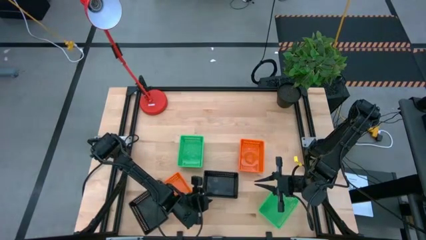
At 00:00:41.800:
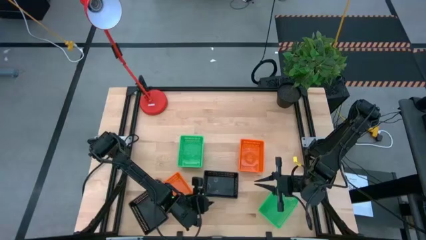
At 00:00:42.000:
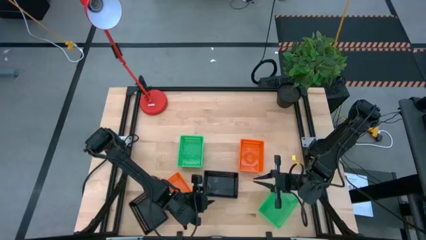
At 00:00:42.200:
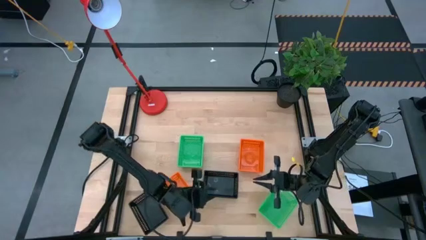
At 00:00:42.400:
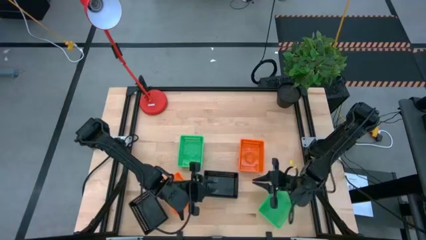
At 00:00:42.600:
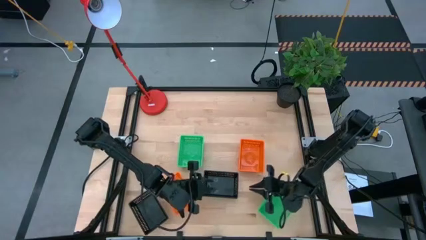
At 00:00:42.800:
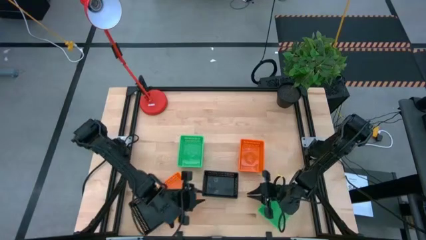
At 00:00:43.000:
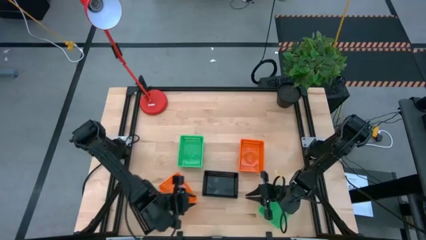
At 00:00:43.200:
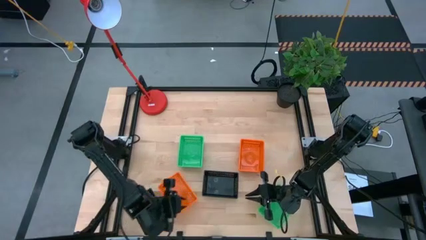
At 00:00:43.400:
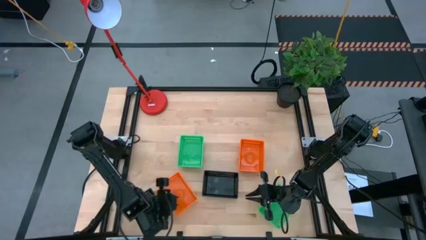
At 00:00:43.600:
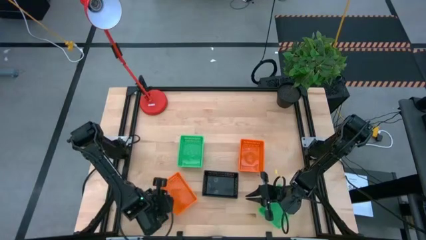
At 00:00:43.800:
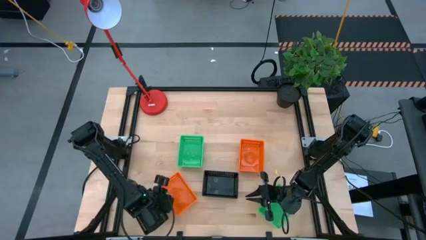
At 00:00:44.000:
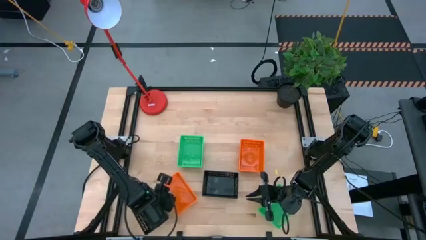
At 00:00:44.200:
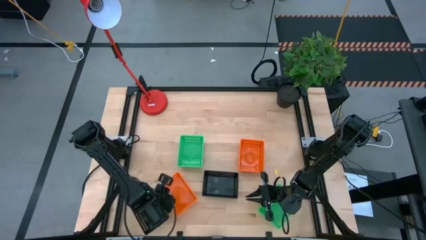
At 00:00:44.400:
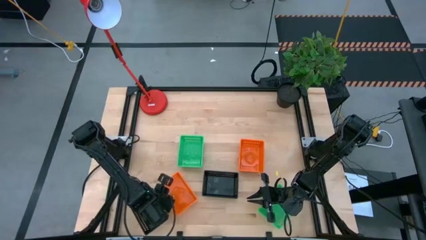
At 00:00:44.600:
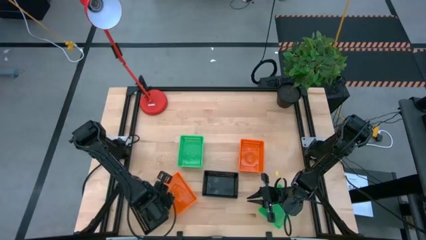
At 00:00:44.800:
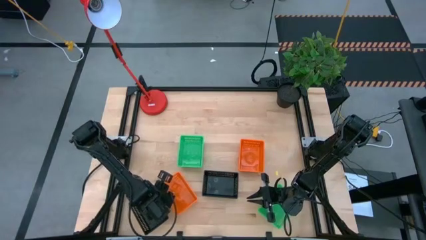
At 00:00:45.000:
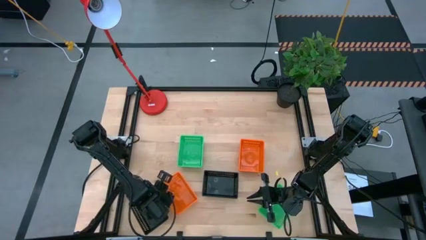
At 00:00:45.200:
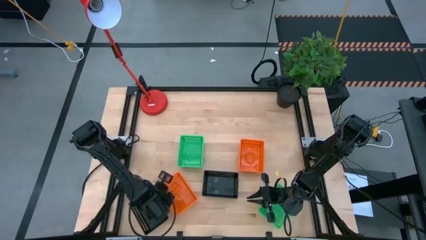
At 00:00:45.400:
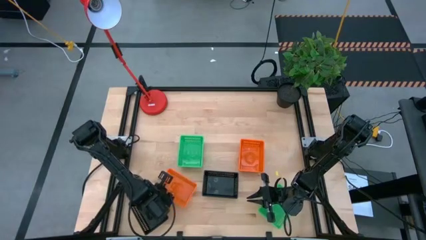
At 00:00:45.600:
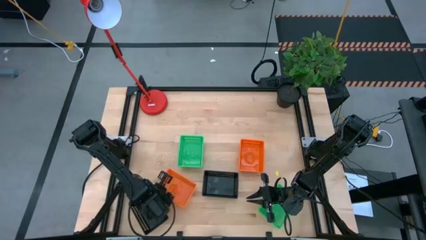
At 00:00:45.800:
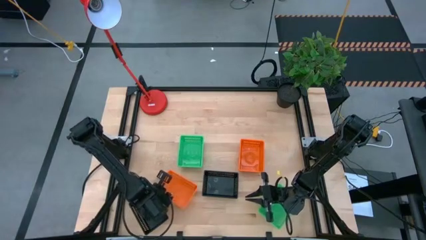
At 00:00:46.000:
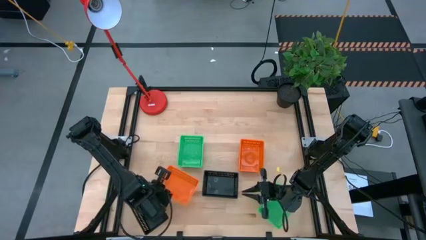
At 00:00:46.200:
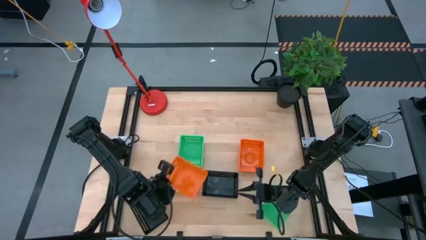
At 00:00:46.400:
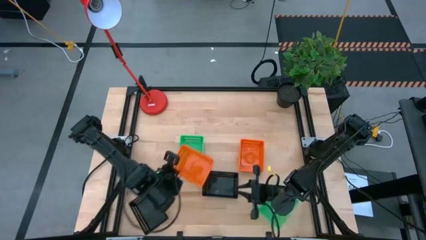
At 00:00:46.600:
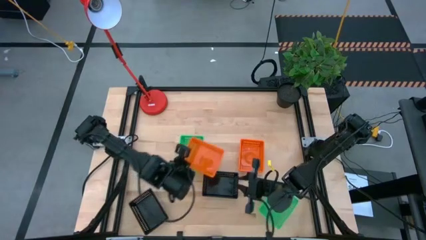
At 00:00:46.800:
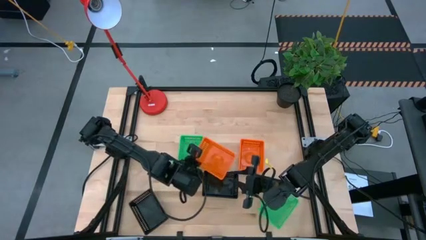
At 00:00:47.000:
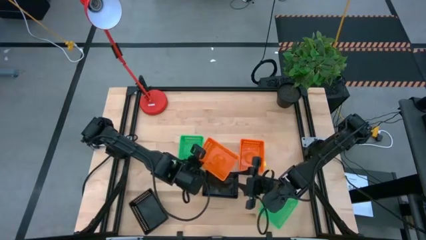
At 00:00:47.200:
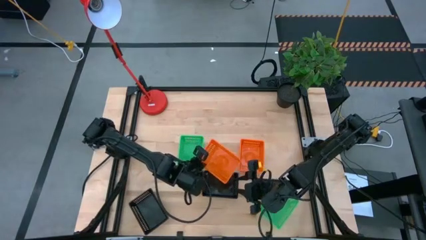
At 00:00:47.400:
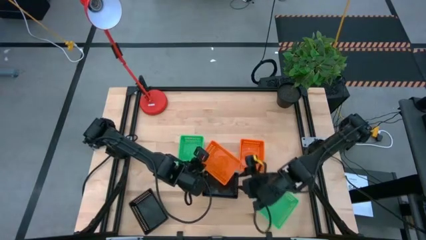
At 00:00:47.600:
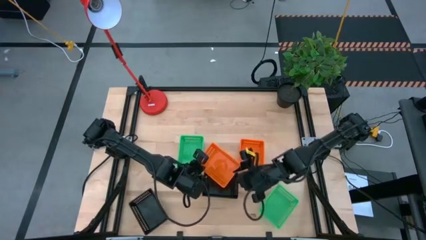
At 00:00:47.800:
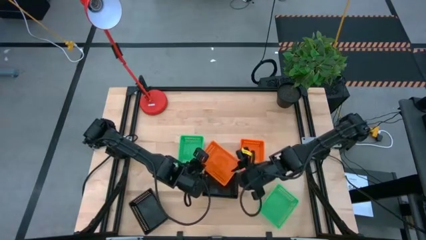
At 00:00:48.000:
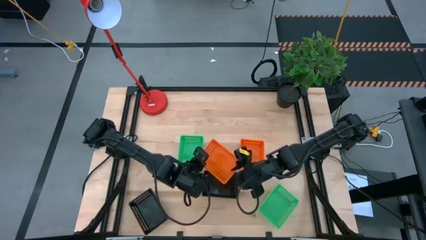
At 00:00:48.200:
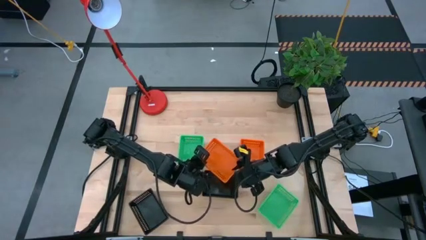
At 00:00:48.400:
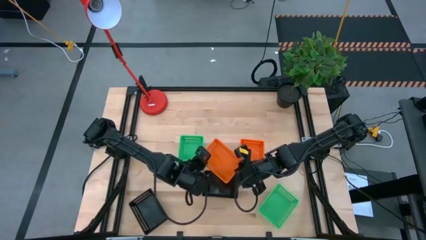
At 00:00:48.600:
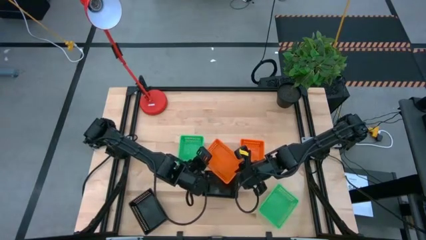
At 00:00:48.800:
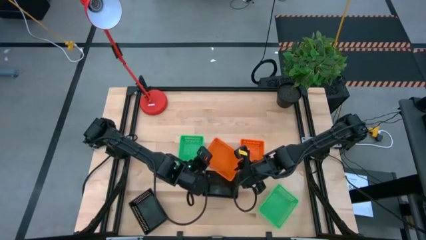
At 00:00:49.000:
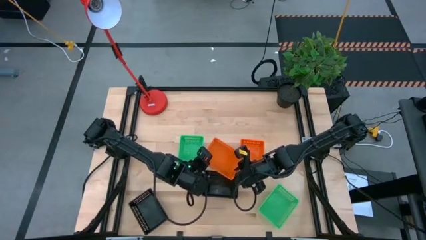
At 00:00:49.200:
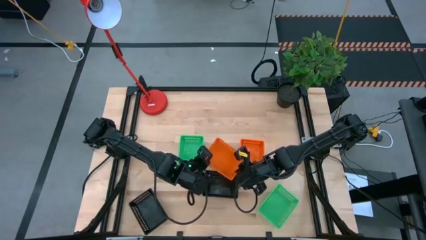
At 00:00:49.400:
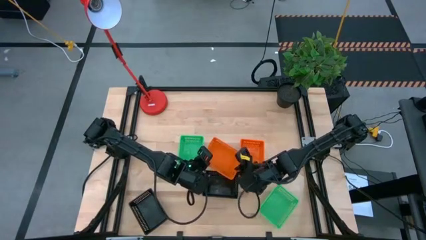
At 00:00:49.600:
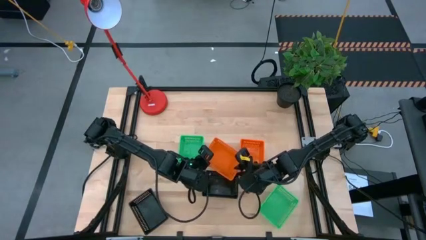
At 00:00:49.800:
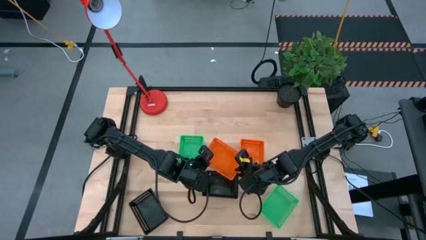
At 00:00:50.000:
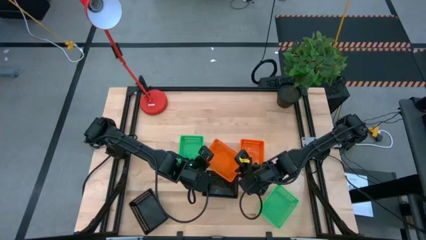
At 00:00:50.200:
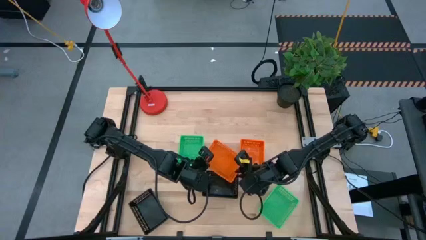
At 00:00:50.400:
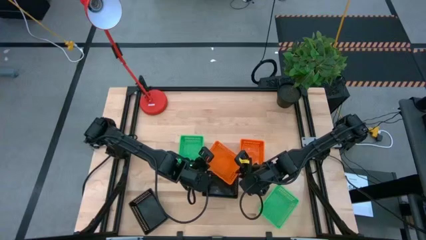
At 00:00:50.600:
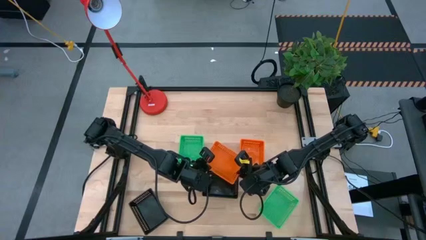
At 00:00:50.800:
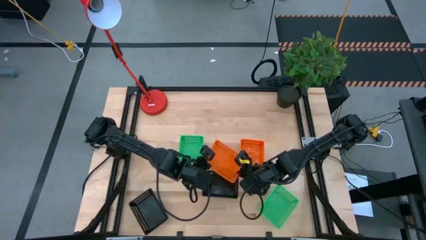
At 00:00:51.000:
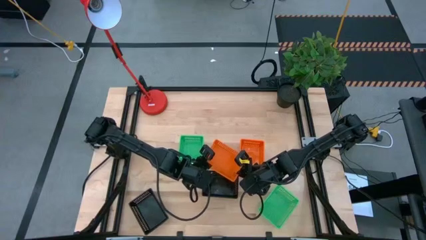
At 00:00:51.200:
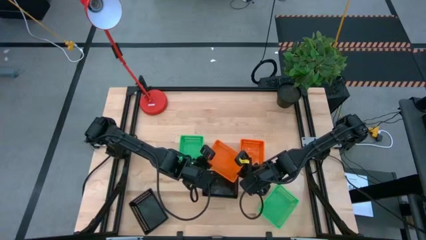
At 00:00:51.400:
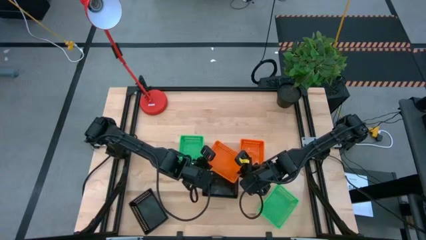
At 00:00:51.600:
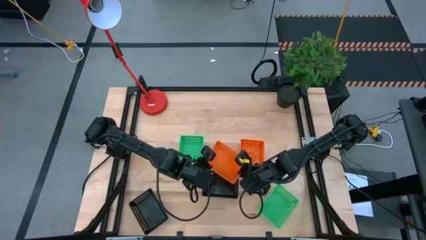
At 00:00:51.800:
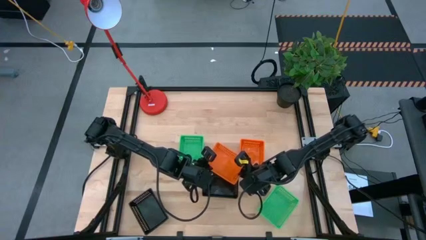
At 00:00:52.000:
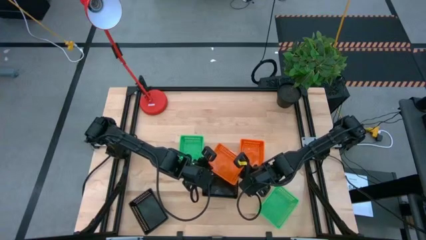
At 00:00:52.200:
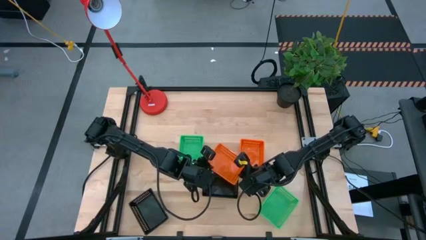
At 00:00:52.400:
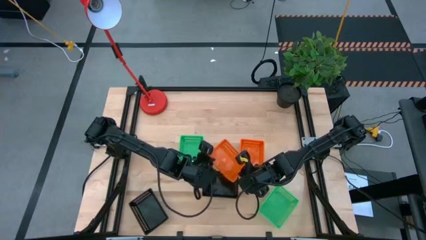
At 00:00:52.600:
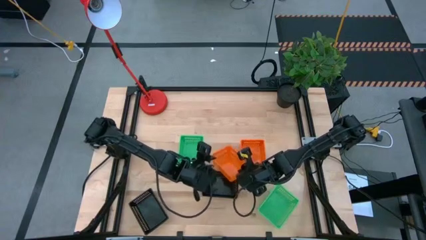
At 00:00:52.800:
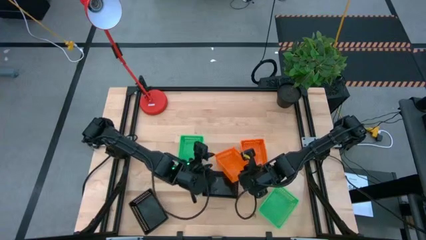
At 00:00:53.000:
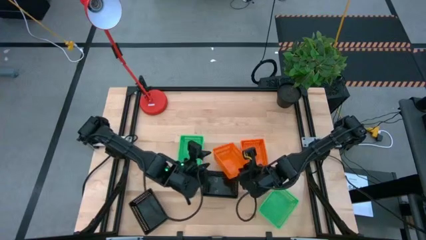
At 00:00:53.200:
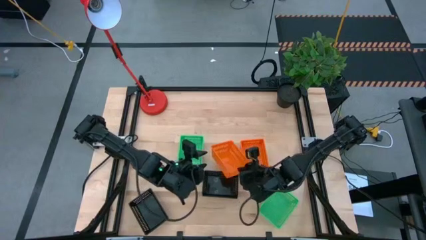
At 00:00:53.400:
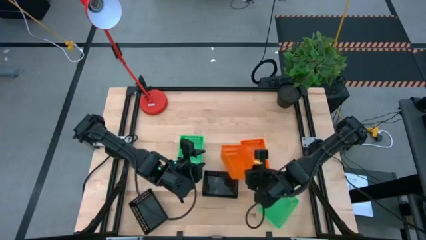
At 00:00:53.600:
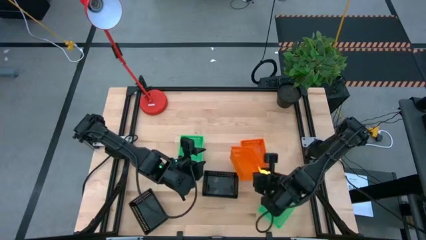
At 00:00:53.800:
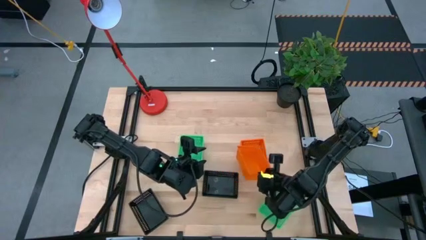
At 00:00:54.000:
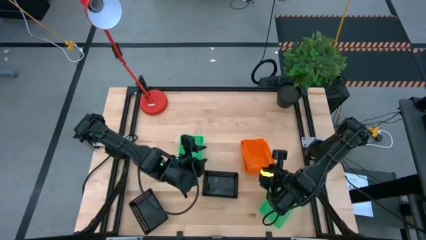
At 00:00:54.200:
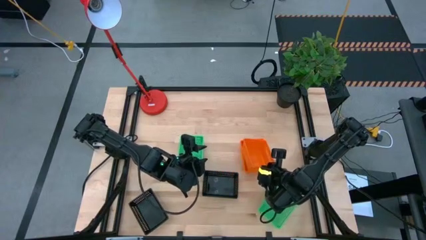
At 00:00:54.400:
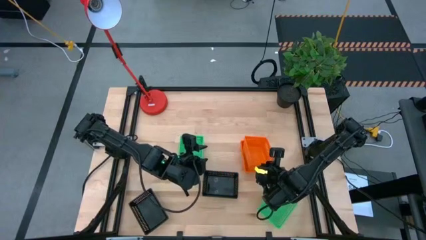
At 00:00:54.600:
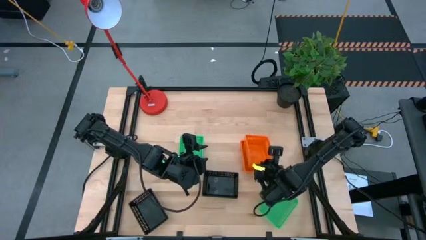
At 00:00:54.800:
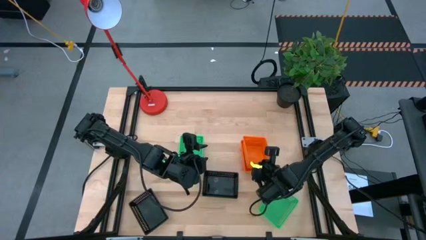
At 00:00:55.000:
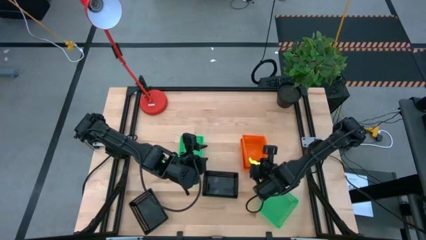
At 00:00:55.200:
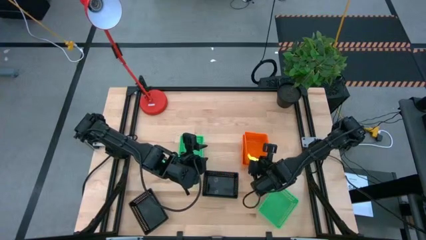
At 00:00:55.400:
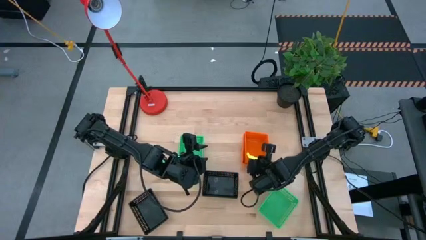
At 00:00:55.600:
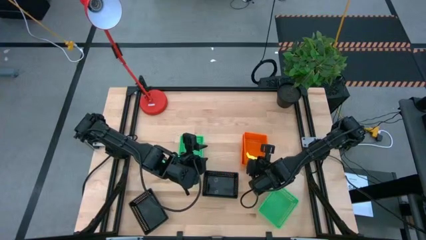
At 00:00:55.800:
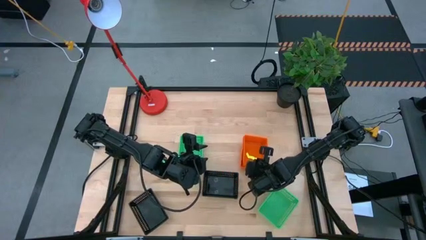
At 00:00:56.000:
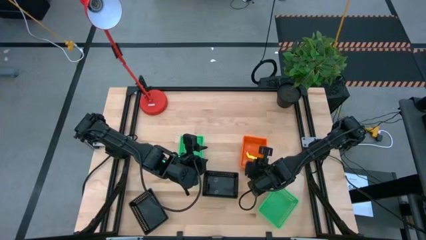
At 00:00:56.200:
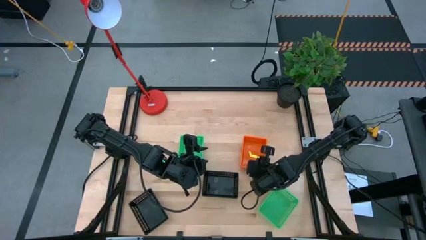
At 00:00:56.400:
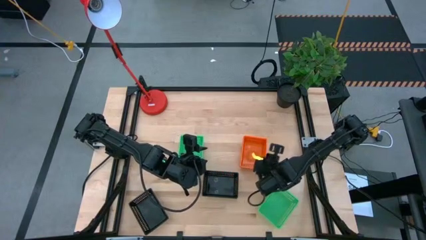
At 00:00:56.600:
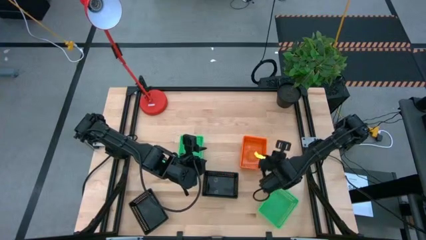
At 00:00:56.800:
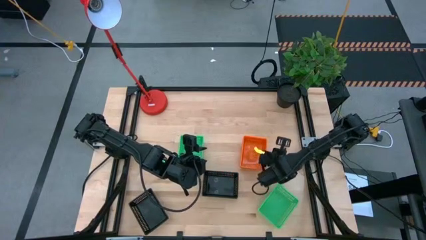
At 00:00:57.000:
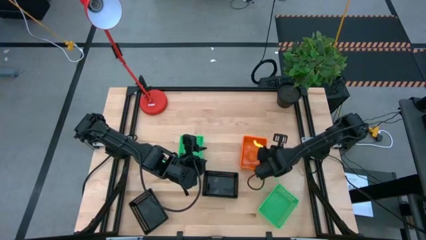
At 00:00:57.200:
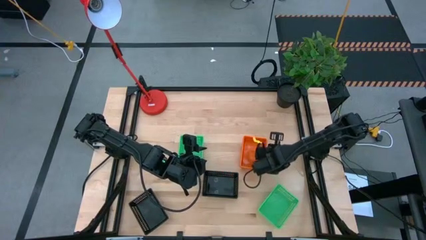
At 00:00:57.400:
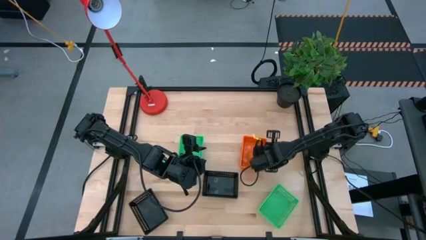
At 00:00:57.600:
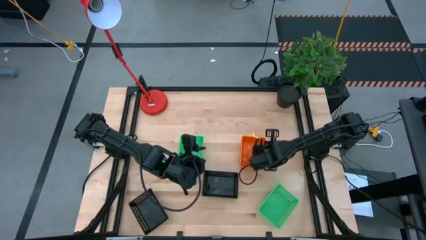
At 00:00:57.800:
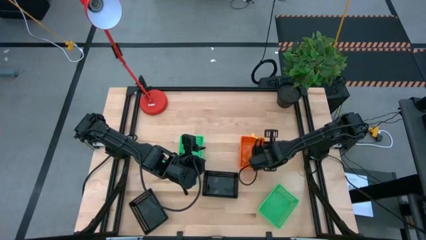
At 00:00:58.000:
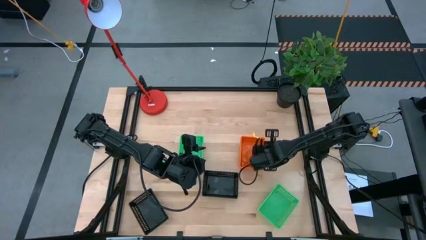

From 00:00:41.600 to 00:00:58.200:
Stack the left orange bin on top of the right orange bin
